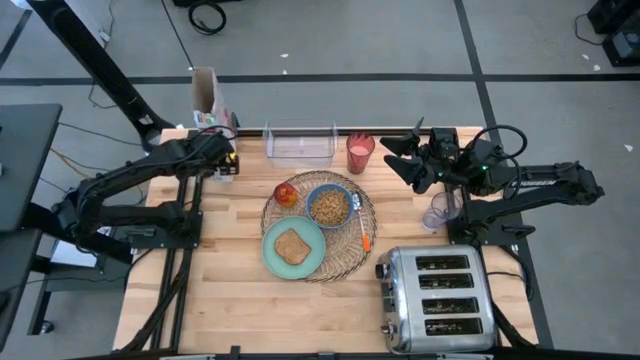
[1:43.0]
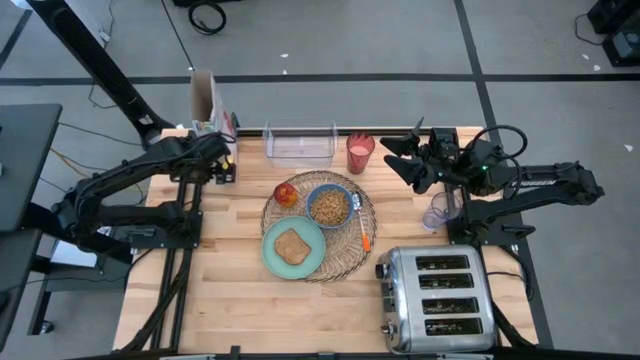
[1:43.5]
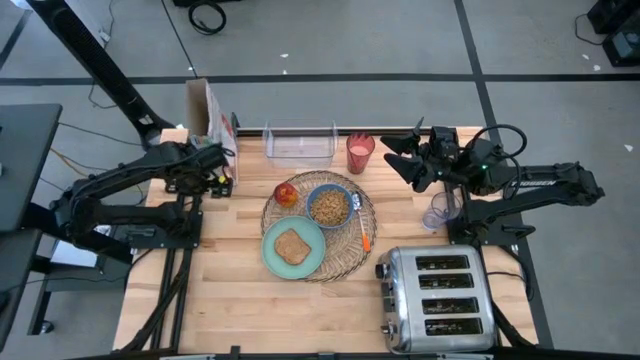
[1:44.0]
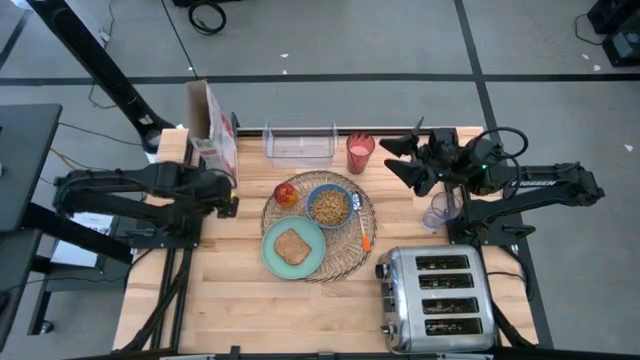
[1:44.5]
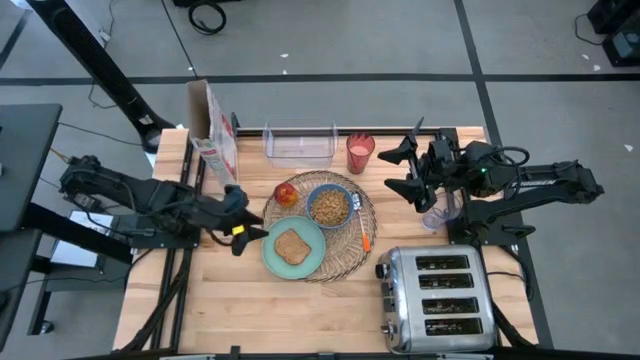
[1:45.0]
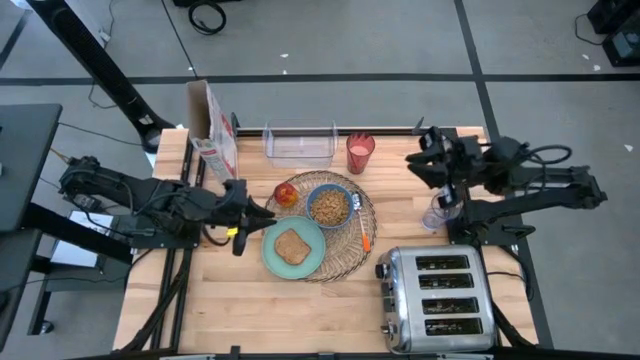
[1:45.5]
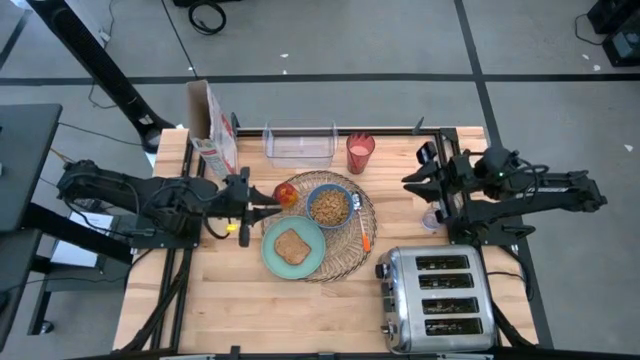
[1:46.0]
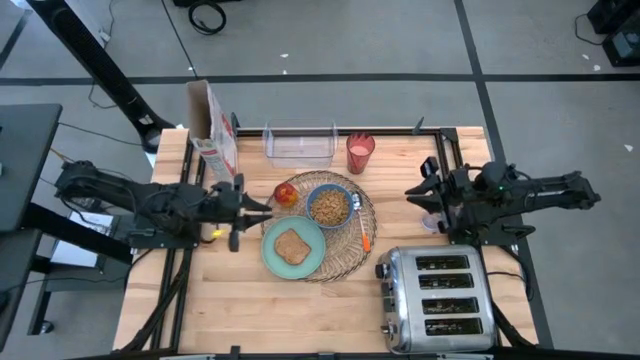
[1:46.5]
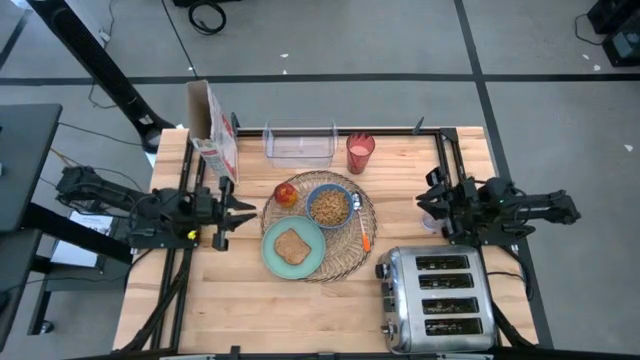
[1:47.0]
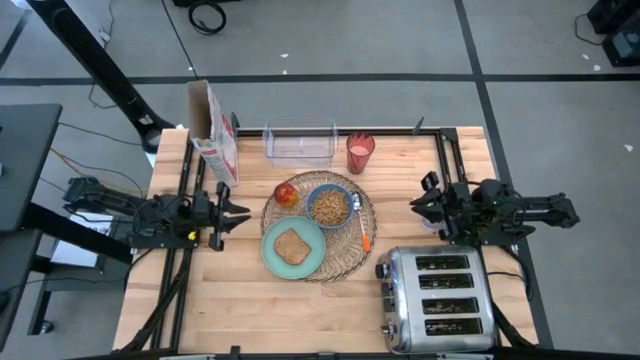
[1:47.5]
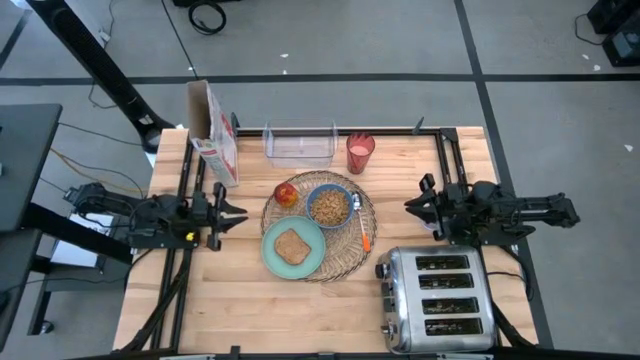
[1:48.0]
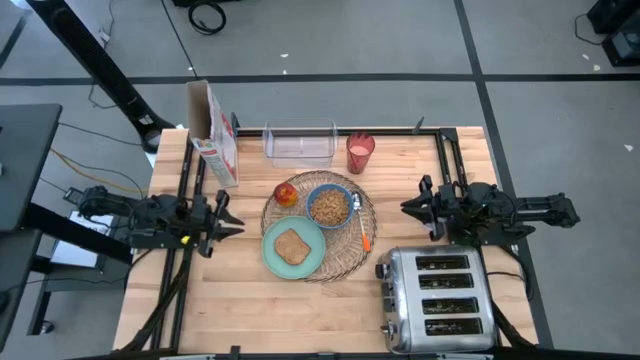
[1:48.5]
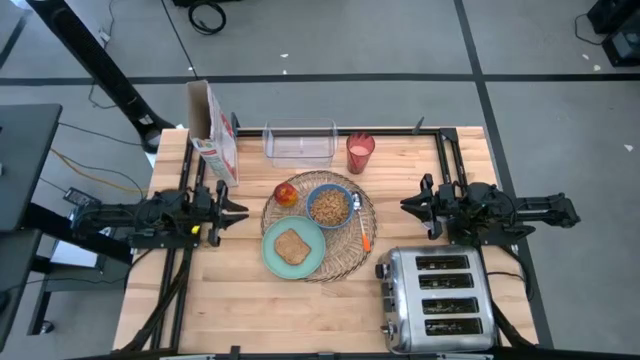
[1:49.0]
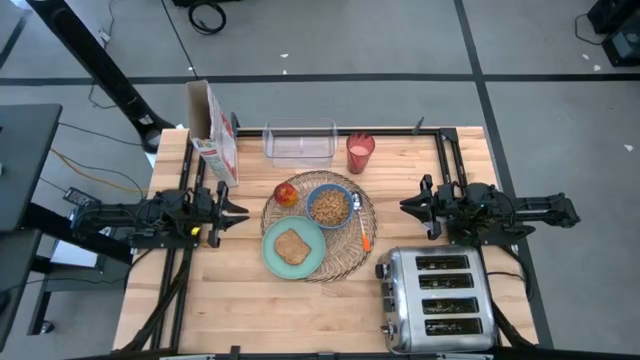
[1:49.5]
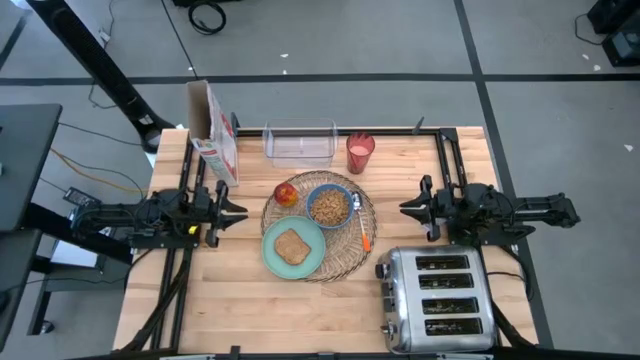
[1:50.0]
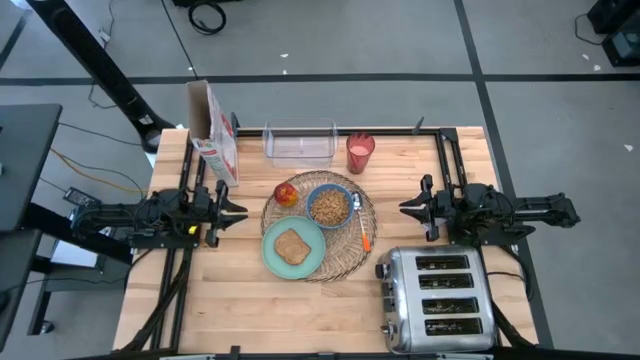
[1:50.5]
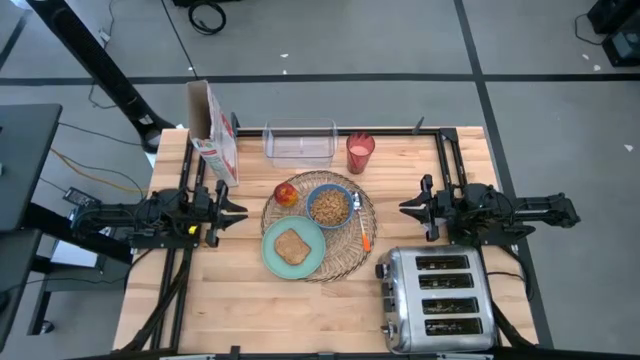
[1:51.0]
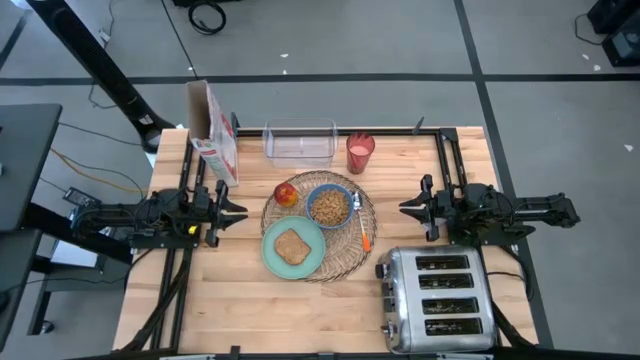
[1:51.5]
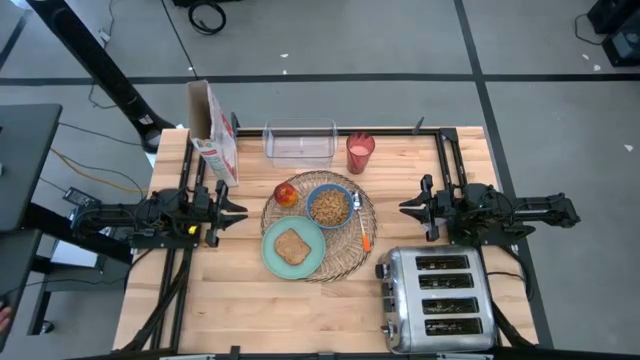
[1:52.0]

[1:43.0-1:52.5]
Task: Arrange a breakfast setting
Return to Home Position

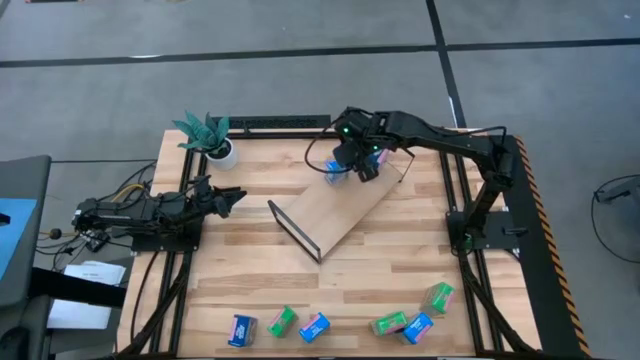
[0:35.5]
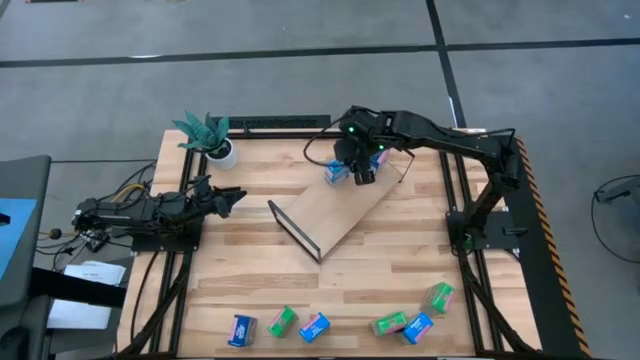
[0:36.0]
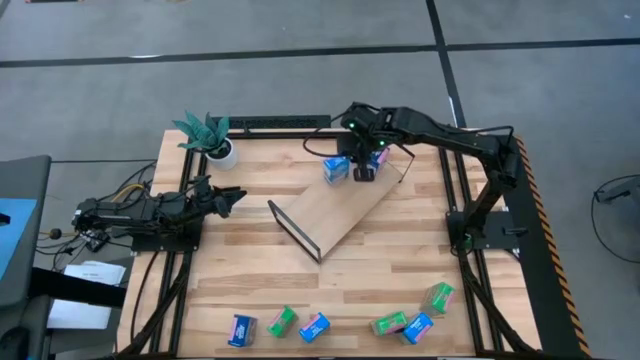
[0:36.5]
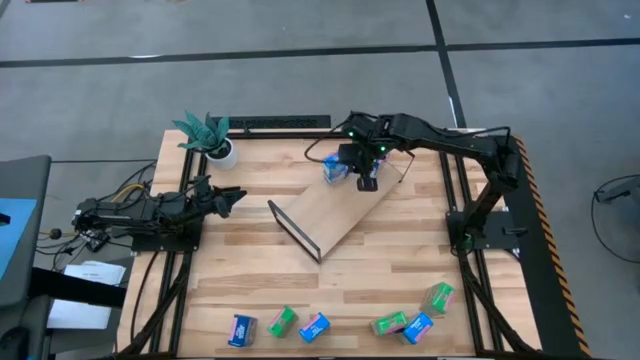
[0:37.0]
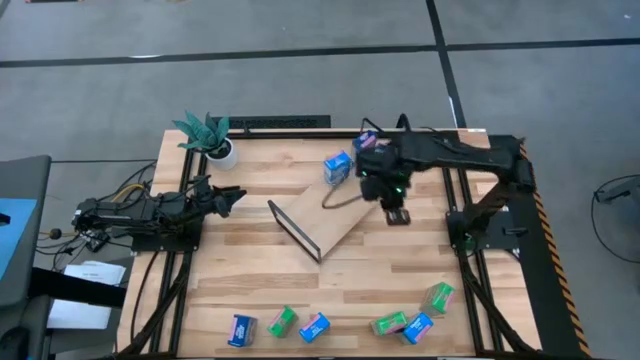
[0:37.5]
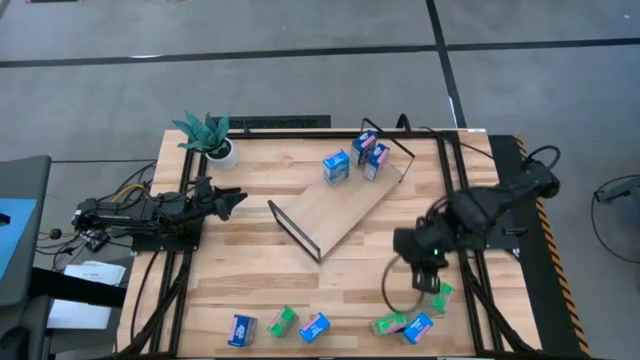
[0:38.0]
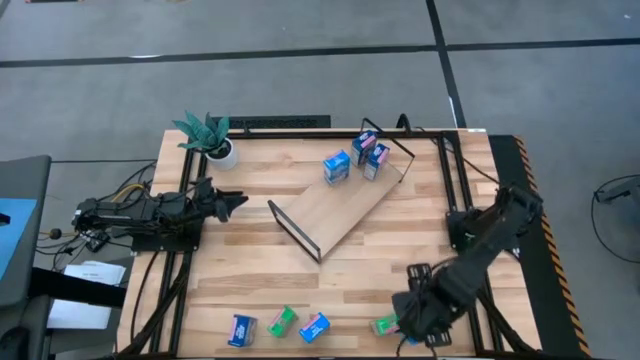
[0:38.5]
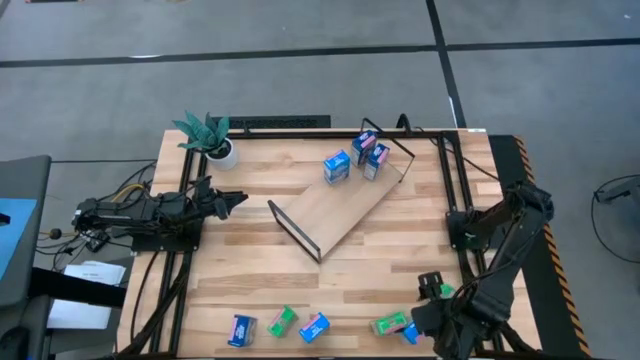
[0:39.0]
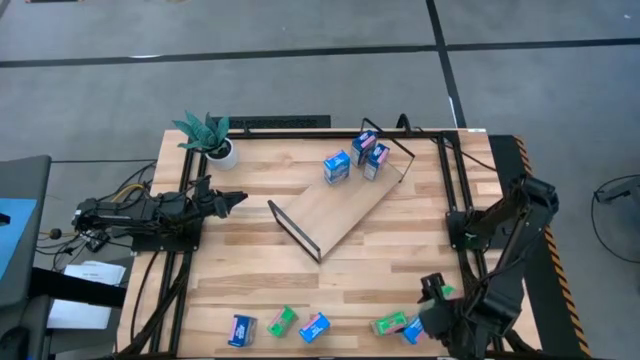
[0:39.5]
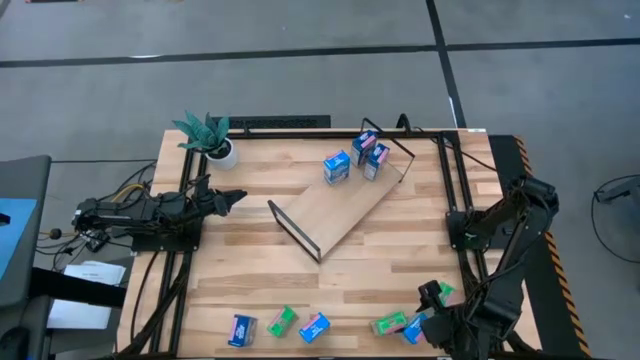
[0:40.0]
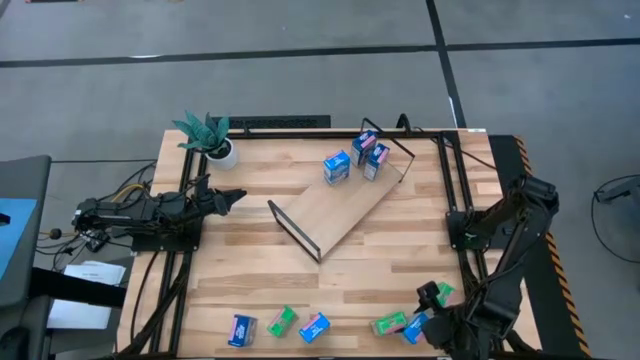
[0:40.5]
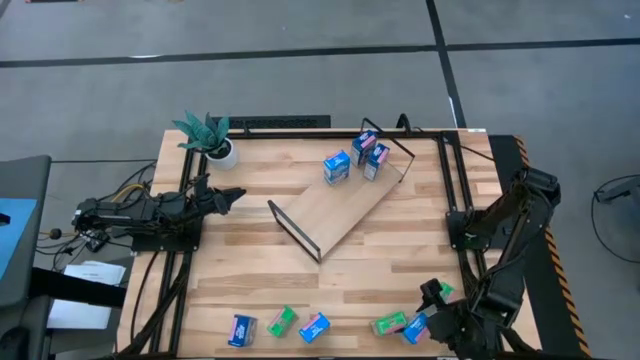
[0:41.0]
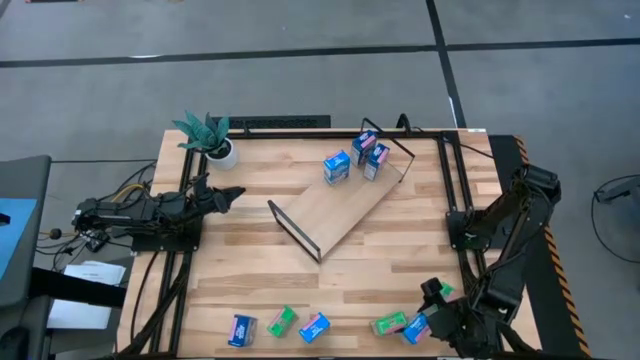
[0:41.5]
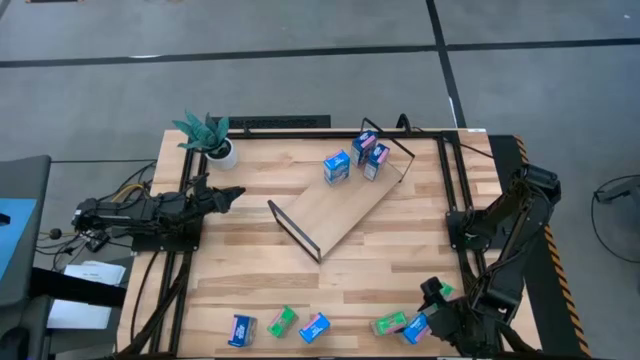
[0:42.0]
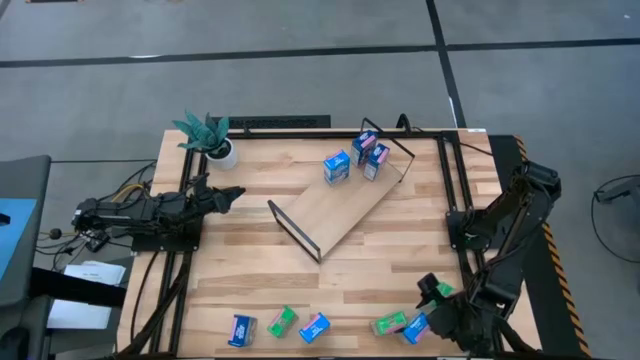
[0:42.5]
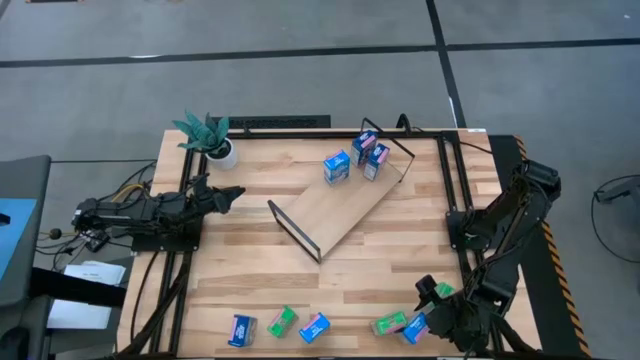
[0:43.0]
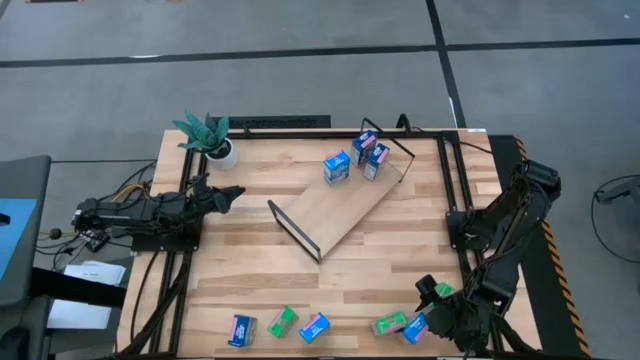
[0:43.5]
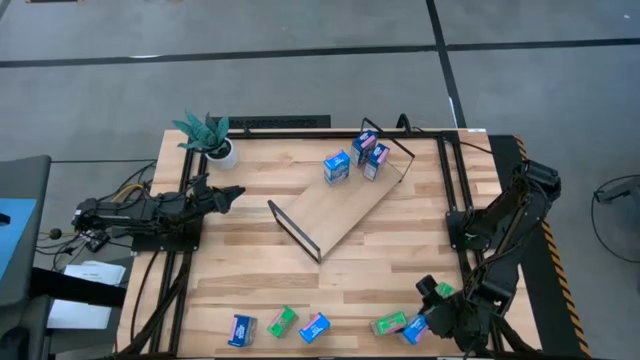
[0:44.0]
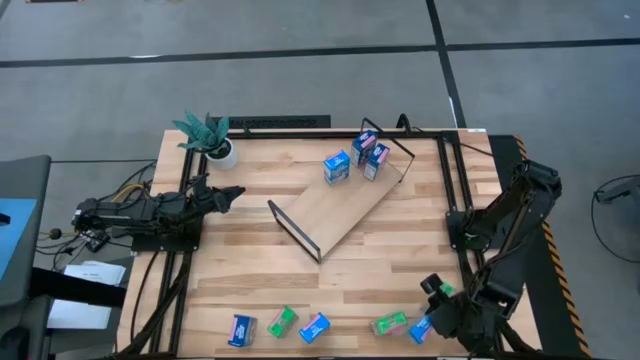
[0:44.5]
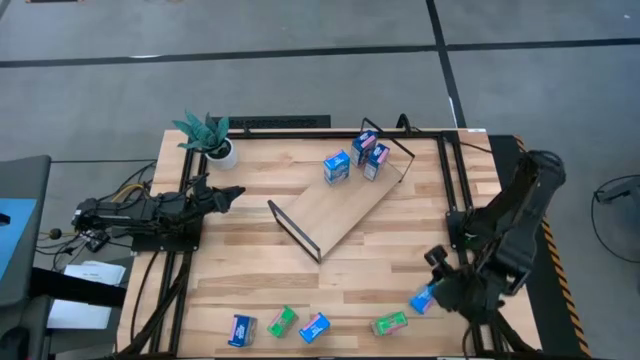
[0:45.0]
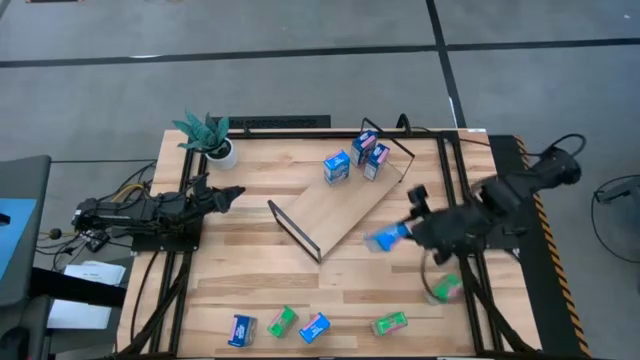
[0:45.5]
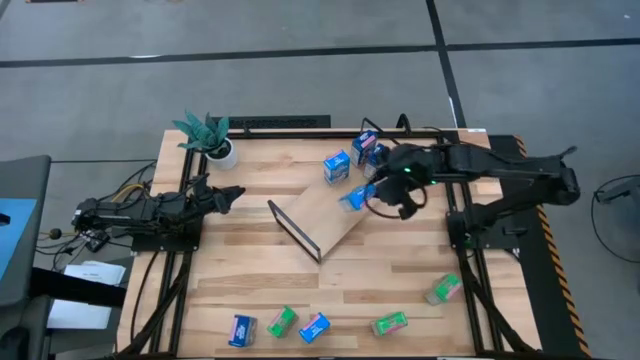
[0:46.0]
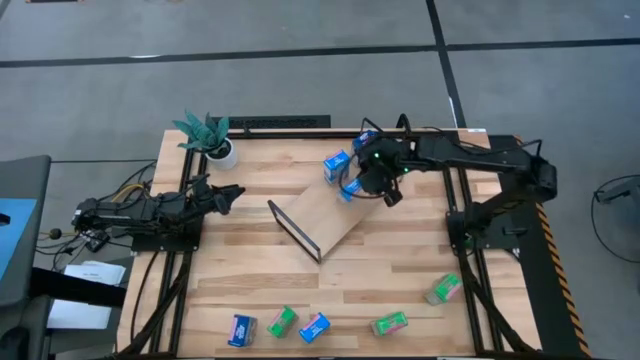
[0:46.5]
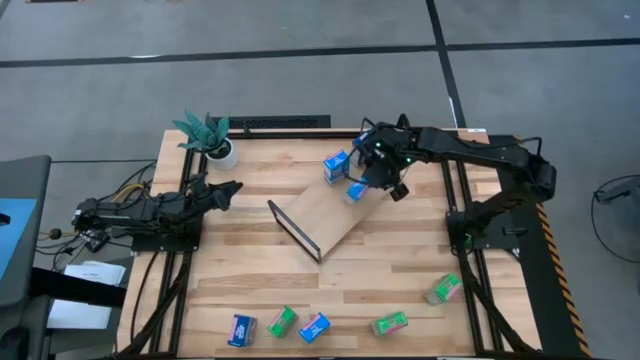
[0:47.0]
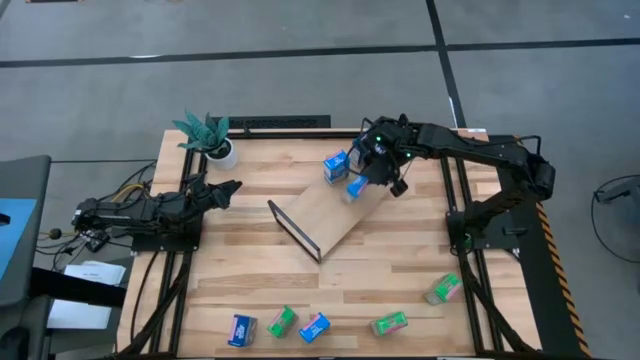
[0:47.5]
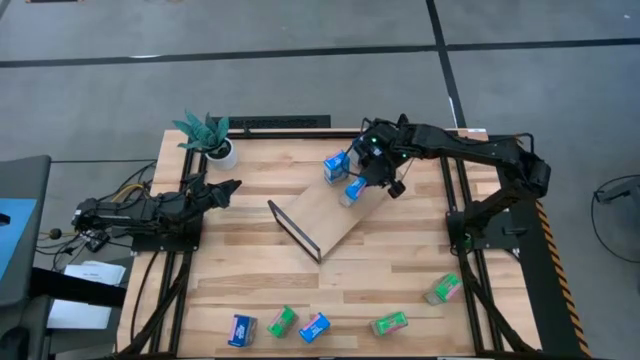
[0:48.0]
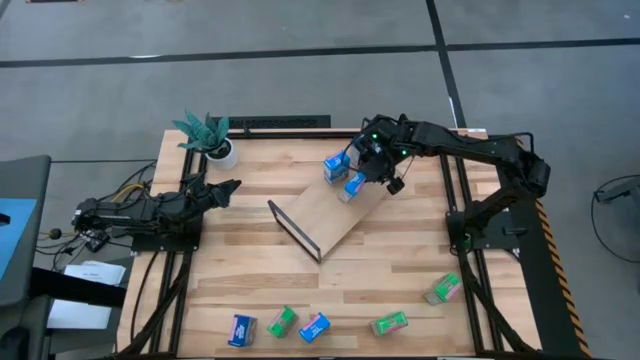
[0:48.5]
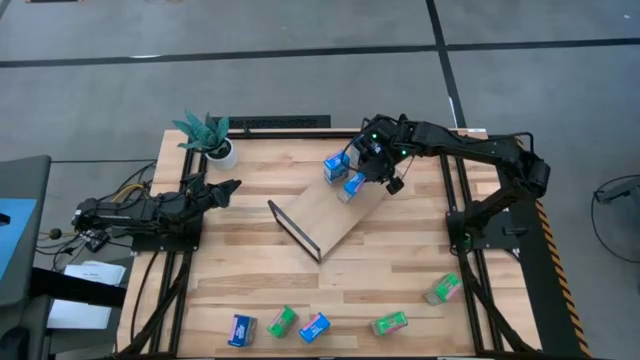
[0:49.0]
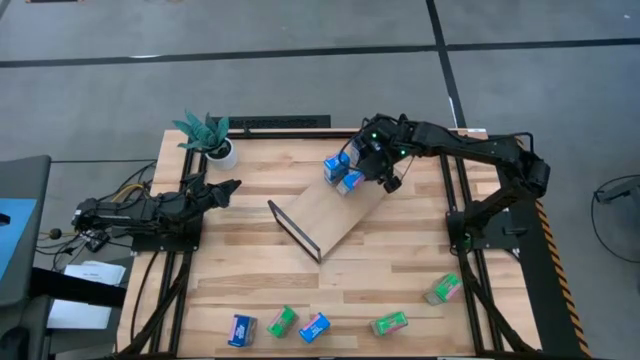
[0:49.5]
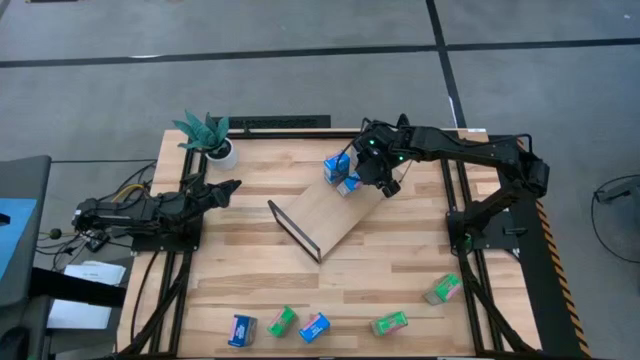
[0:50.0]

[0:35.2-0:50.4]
Task: Stack cereal on shelf
Put the right light blue cereal box on the shelf aligned with the light blue cereal box
